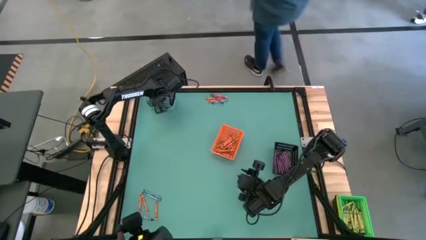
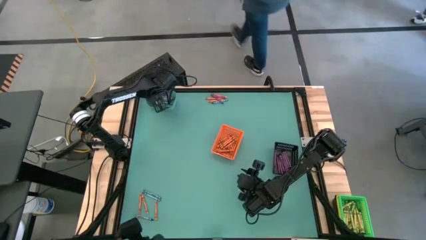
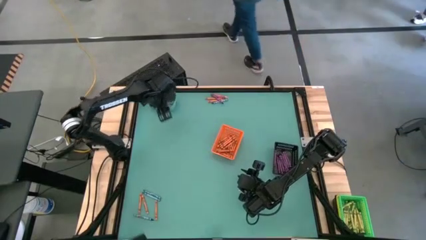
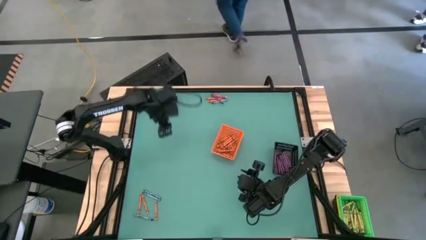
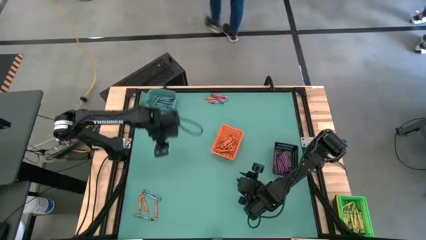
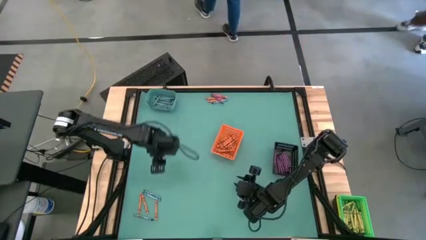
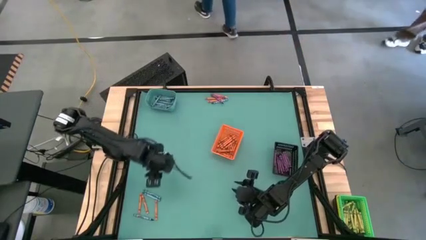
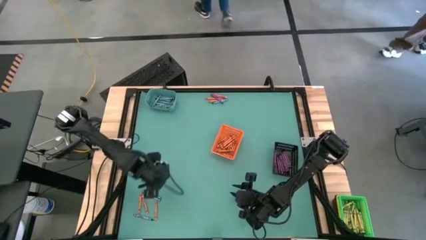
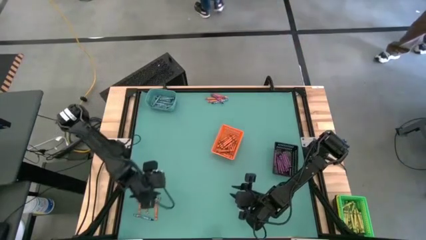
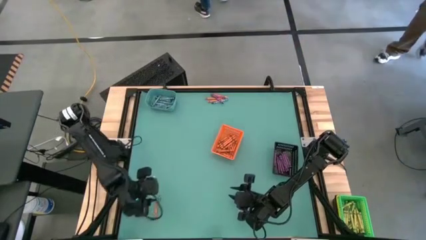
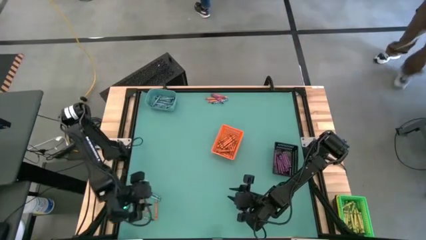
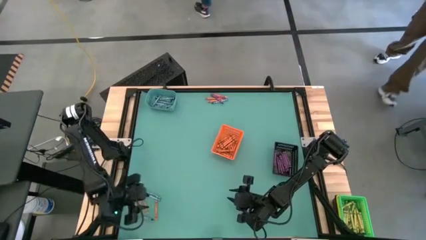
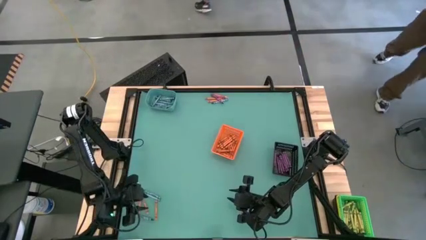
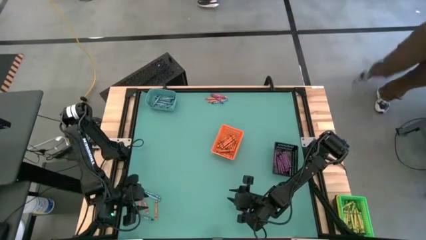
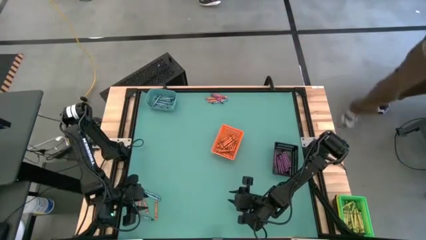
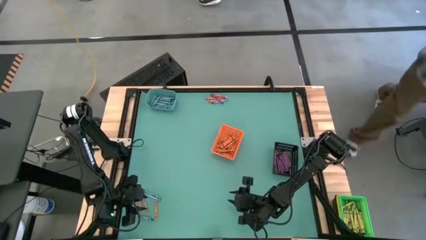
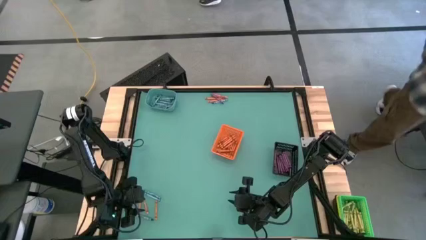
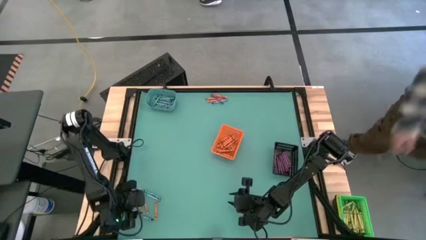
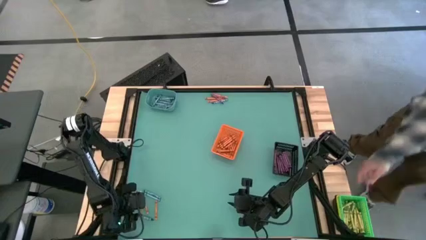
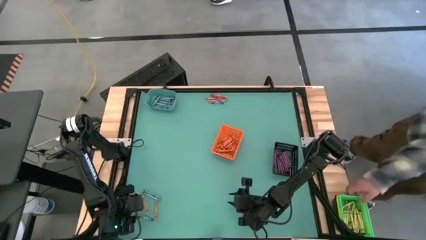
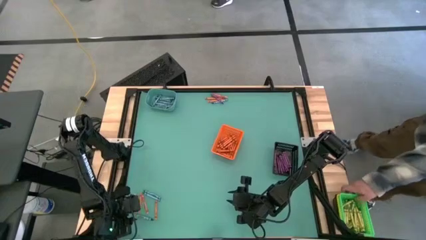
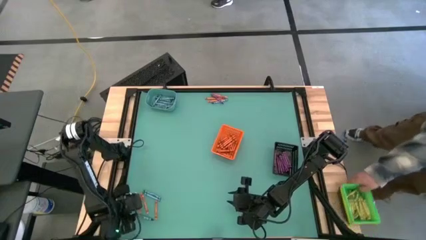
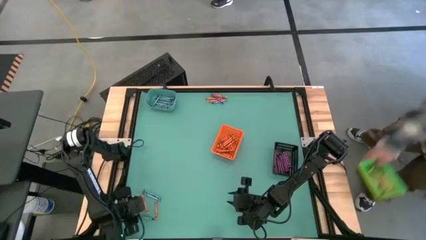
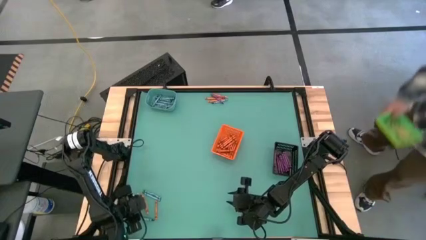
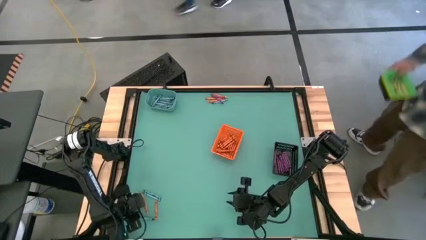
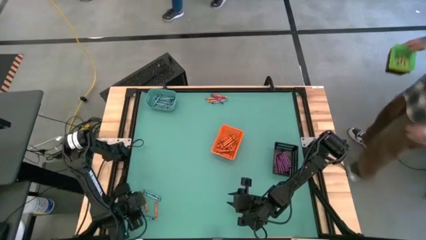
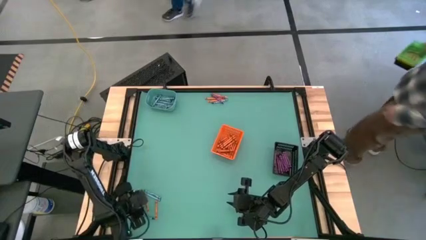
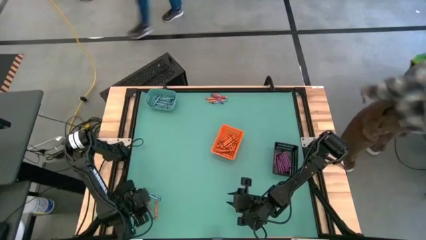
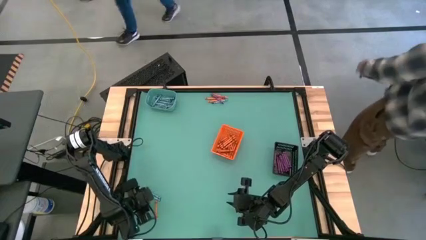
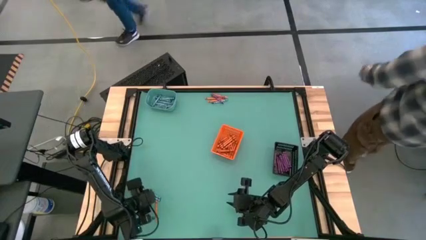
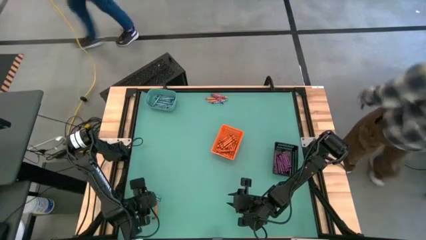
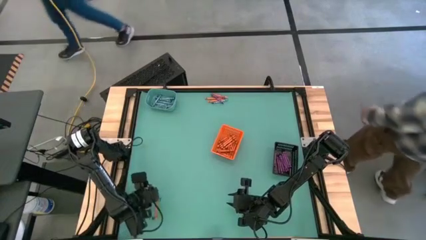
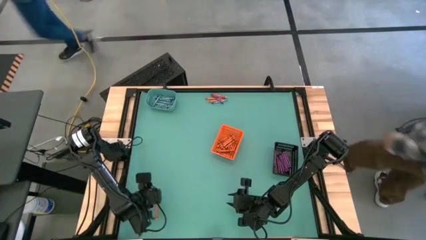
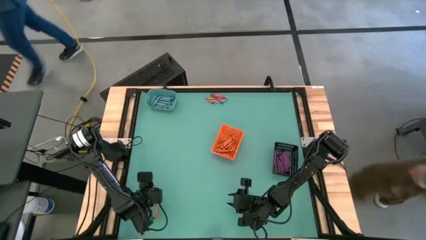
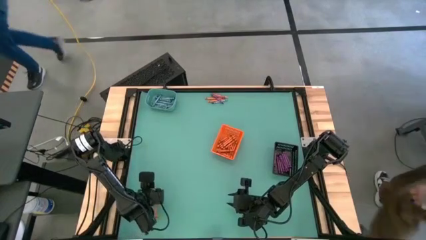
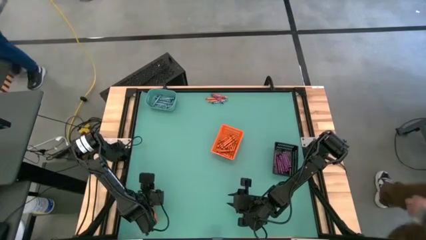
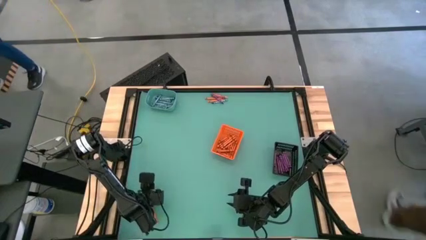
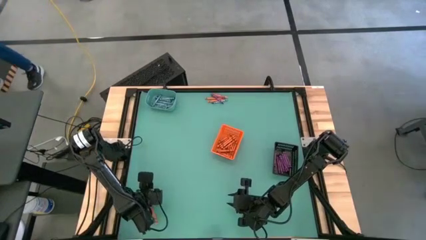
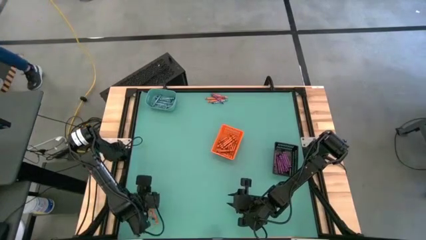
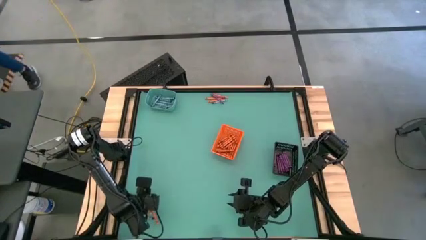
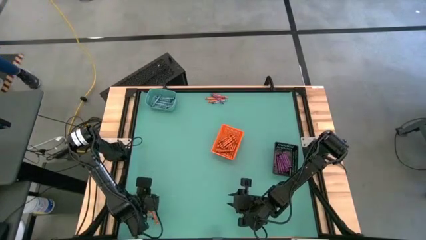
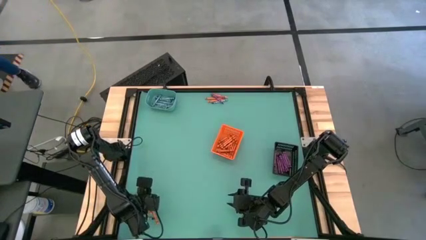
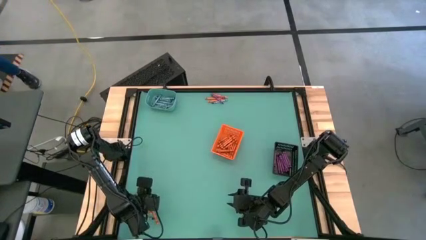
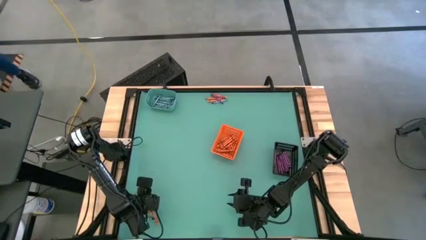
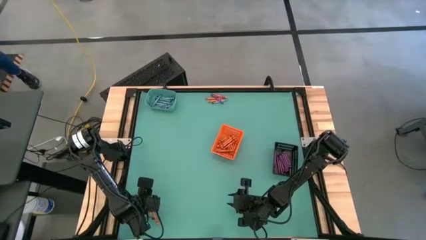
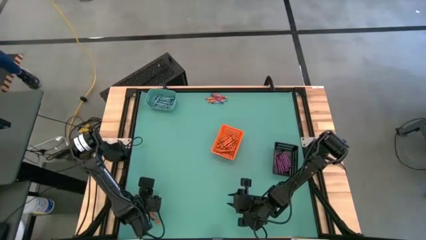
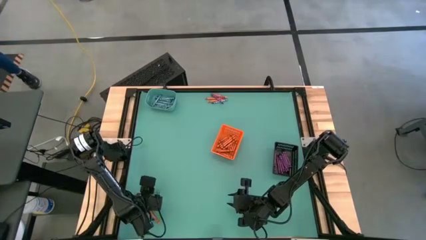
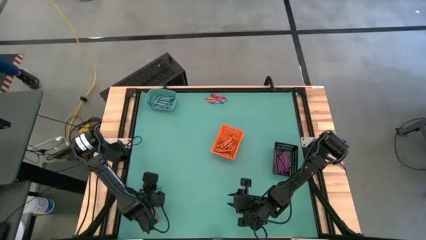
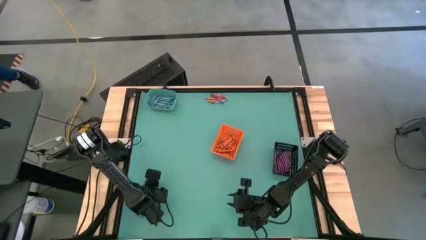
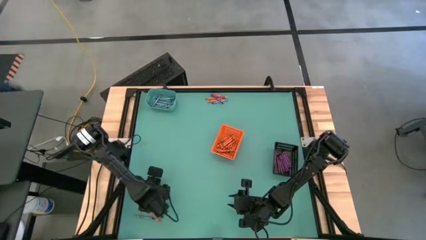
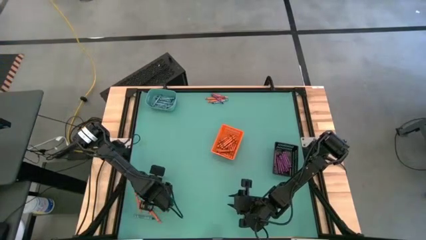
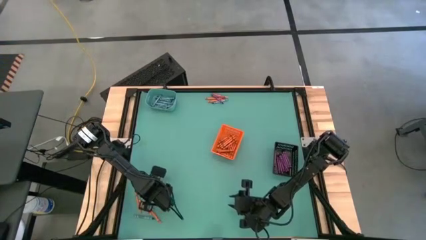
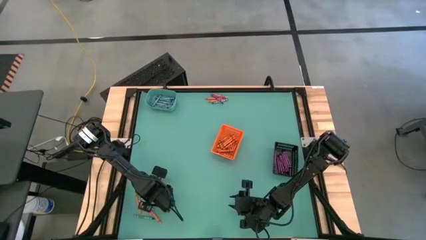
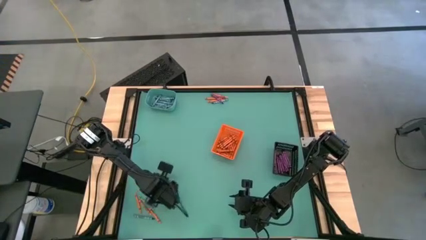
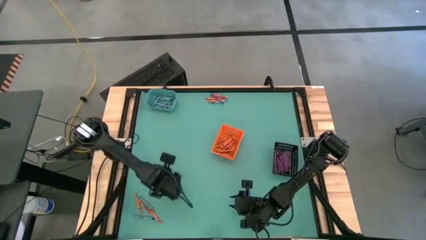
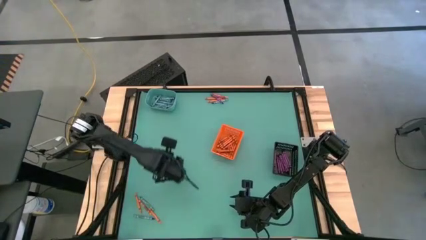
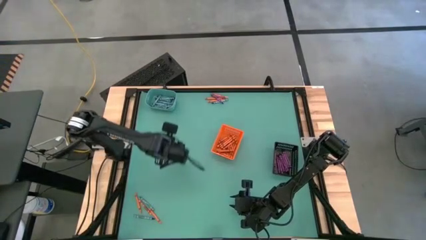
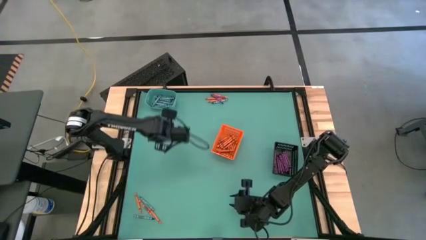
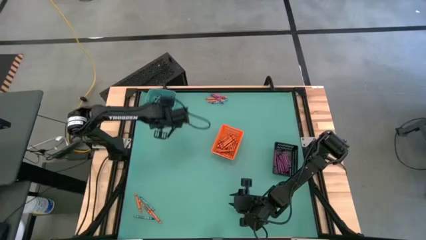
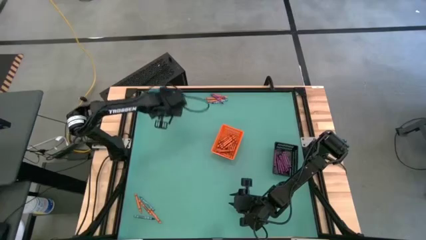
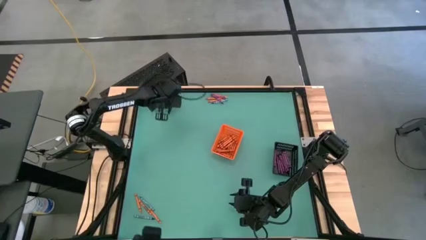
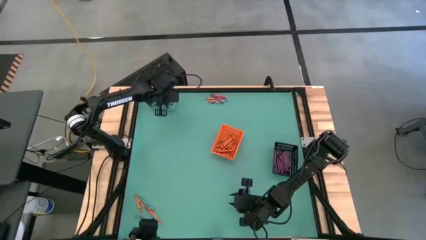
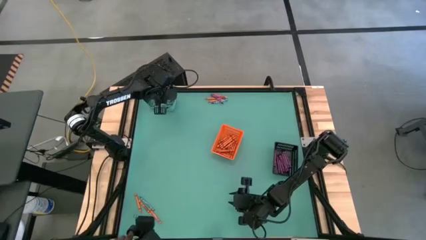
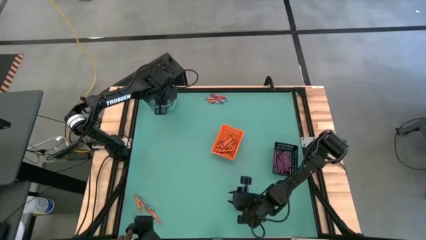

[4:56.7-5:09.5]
Task: Sort crayons
Put the blue crayon into the blue bin

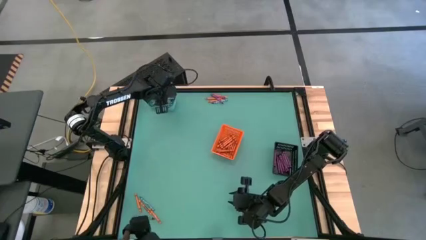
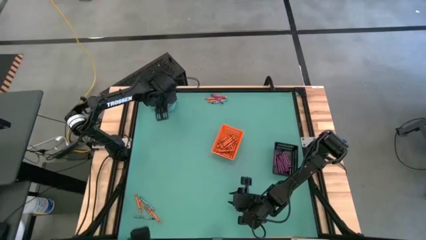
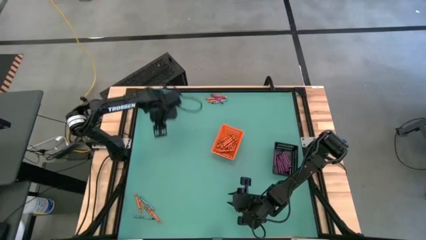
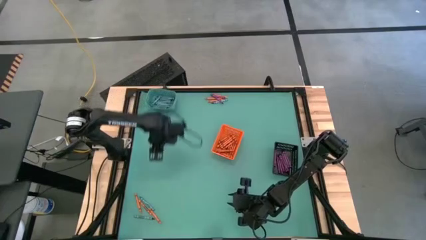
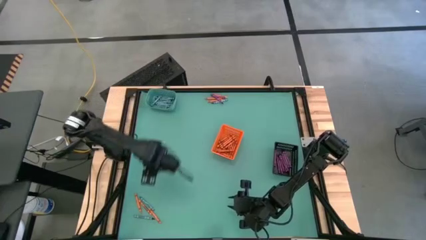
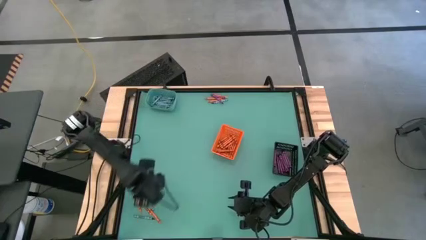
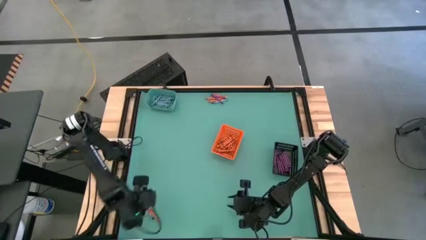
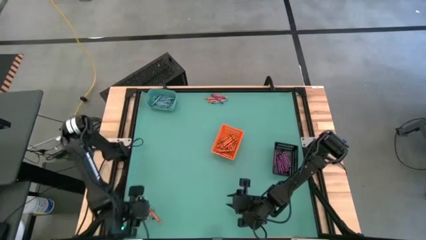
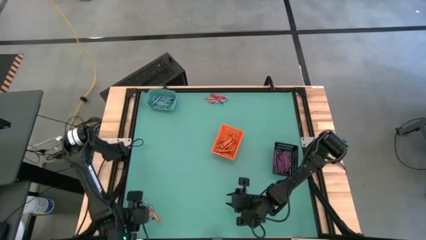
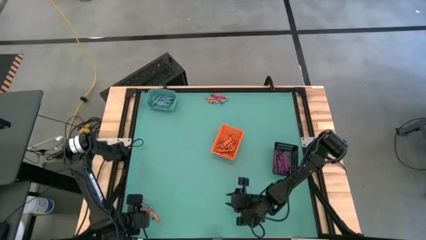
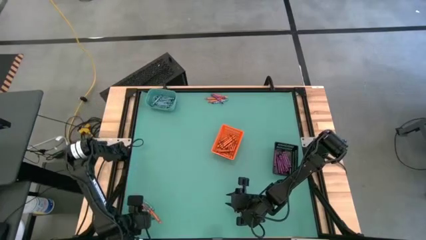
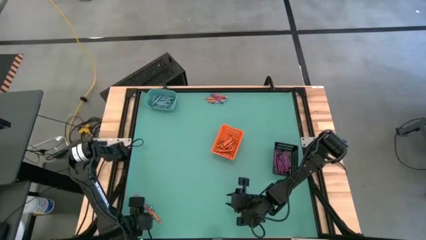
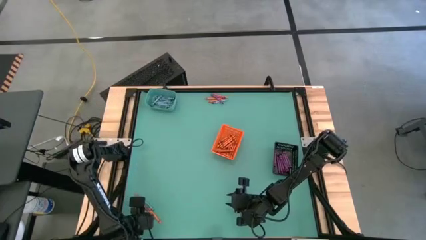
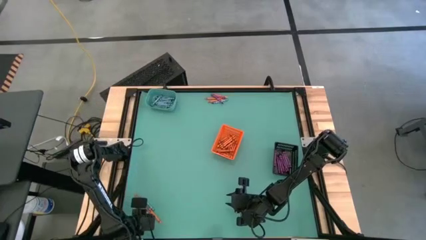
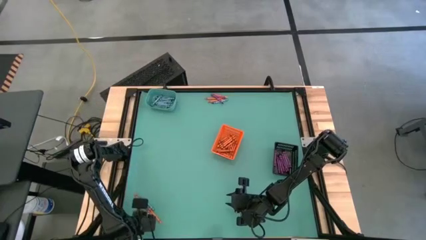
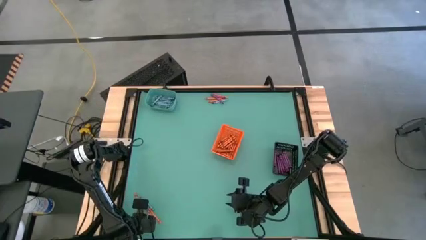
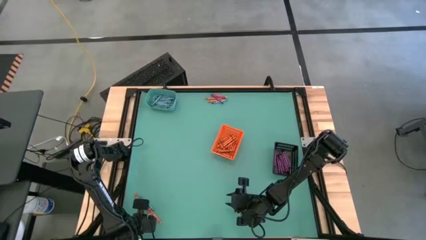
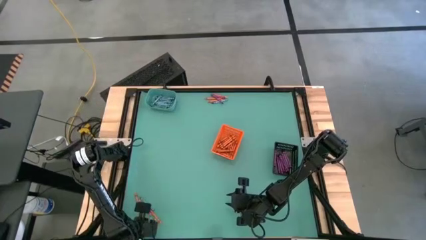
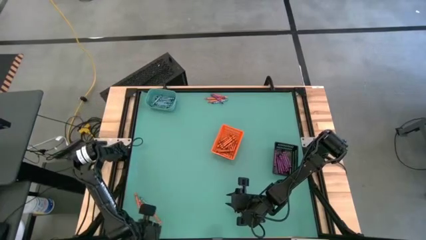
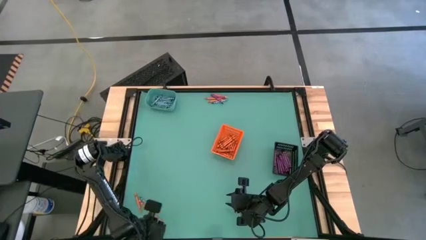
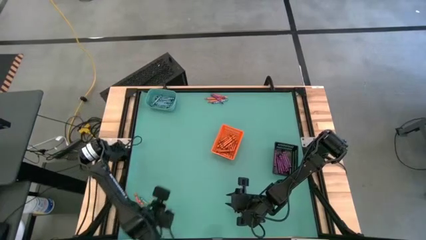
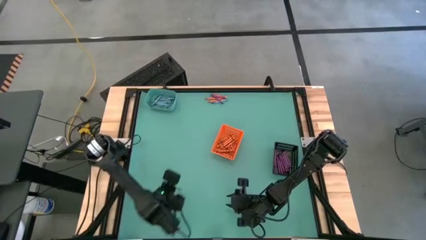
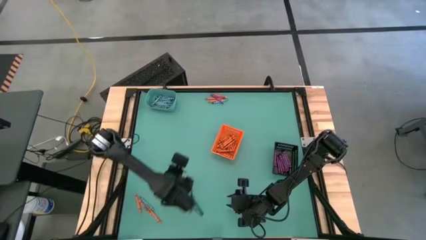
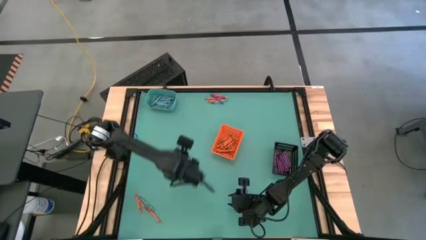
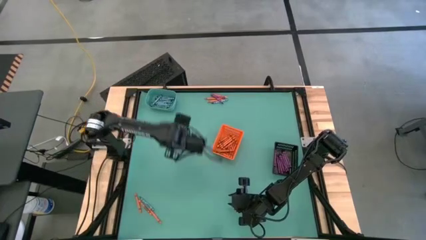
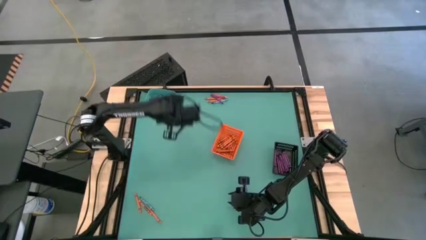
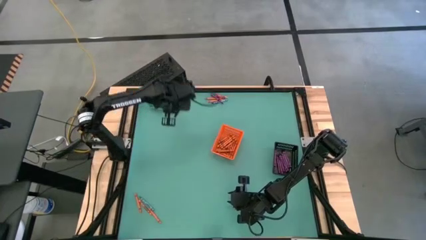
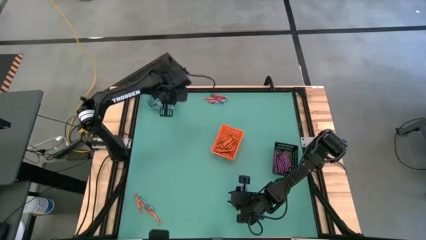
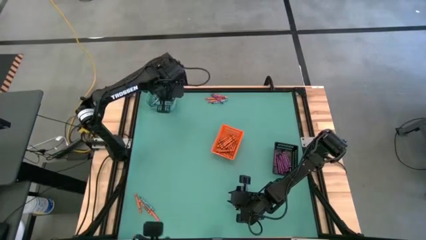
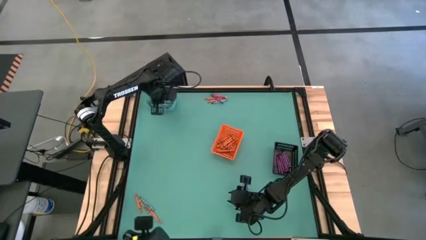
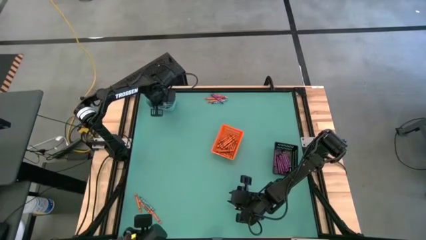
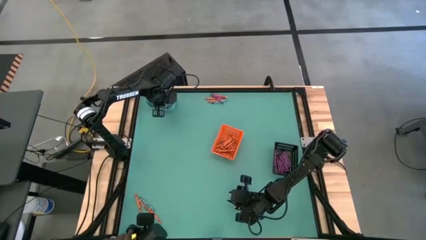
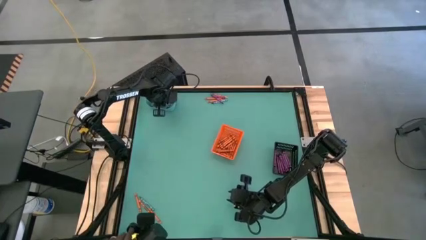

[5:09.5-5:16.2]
Put the blue crayon into the blue bin
